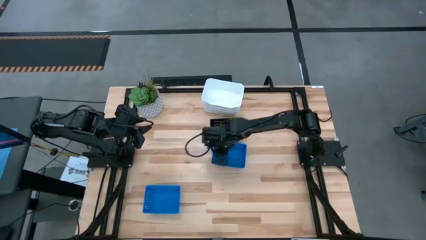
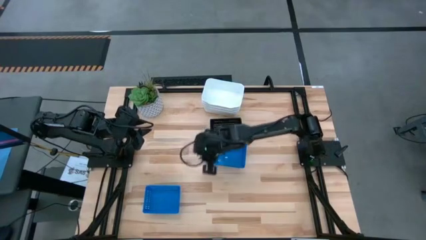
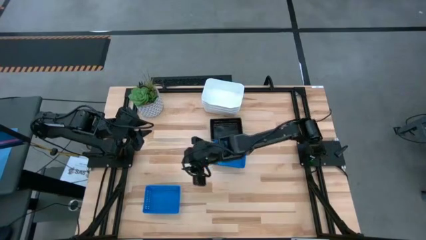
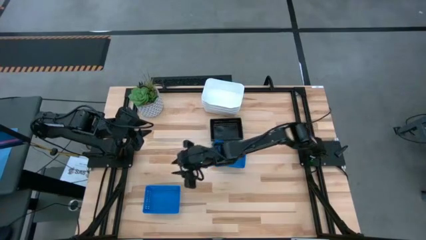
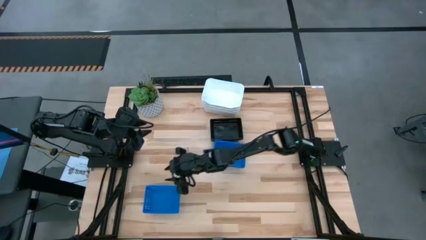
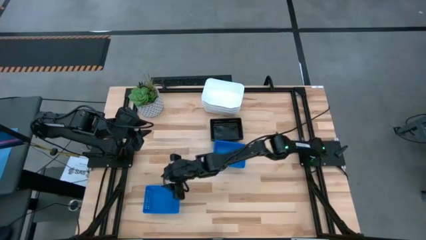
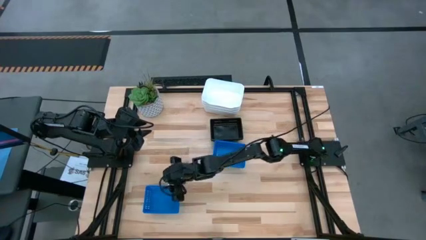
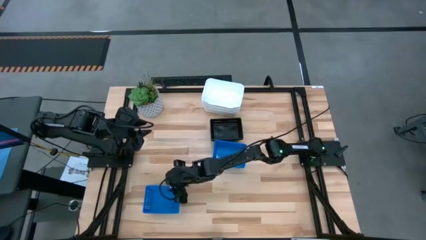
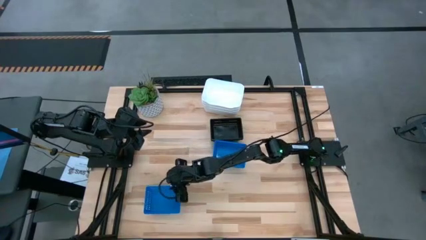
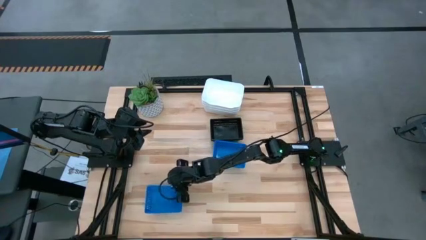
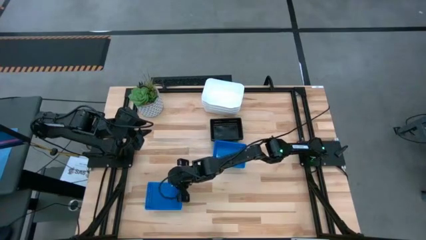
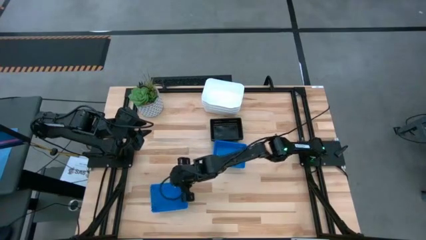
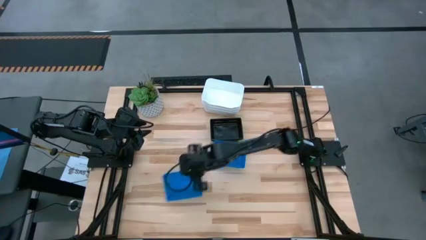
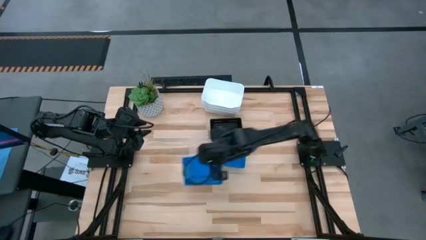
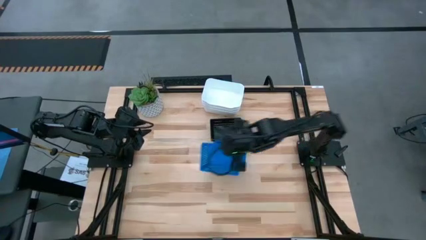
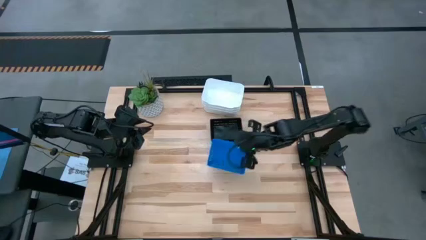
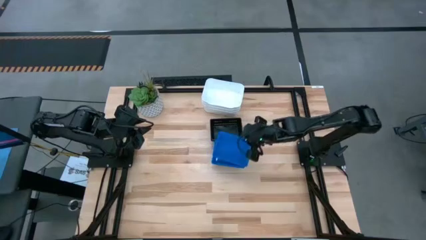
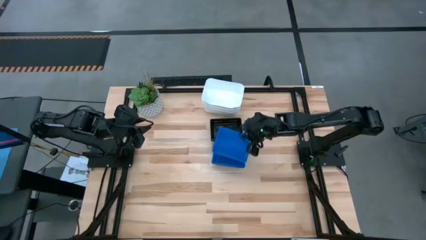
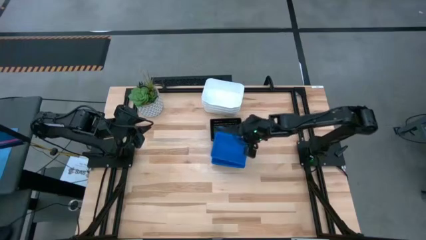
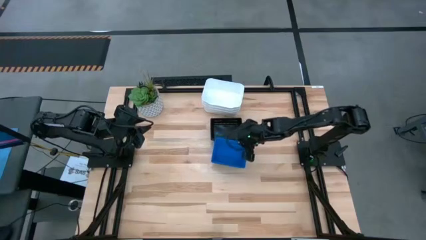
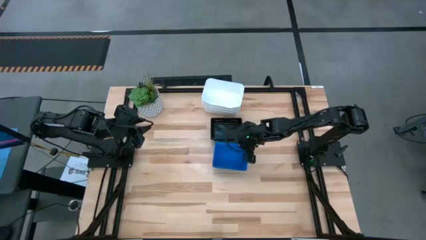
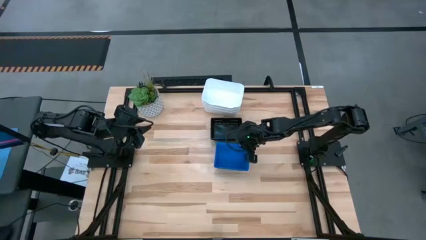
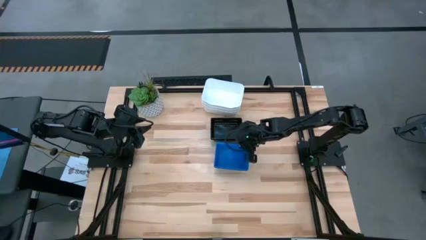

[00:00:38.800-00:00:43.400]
Stack the left blue bin on the right blue bin

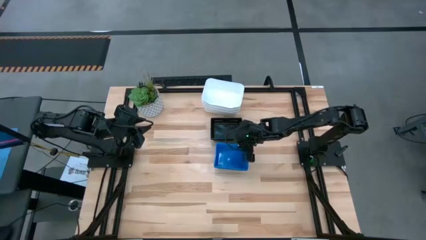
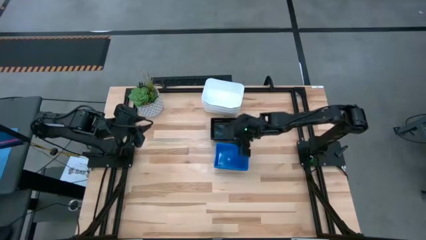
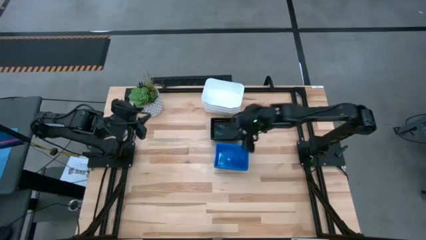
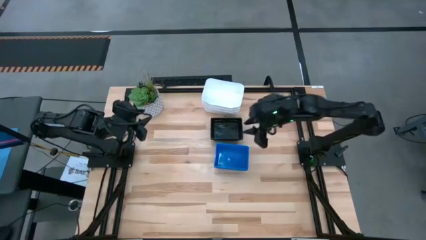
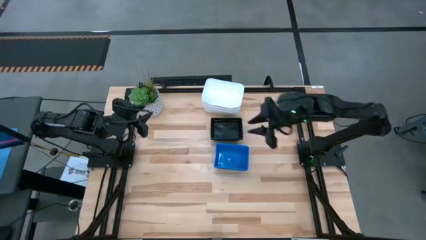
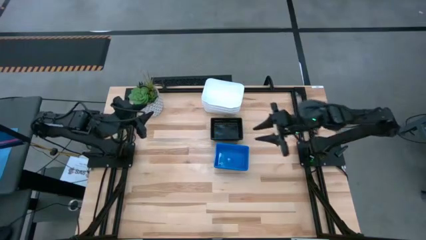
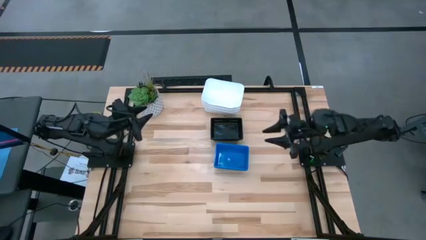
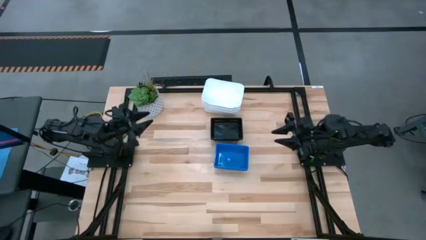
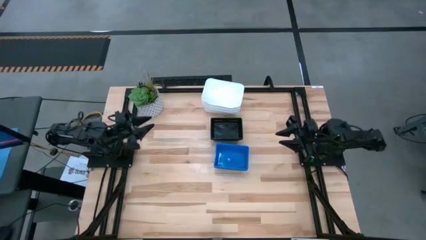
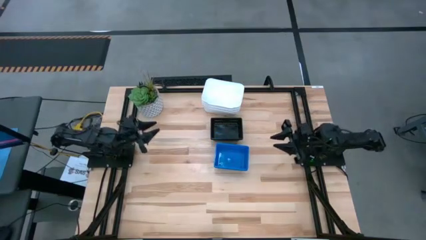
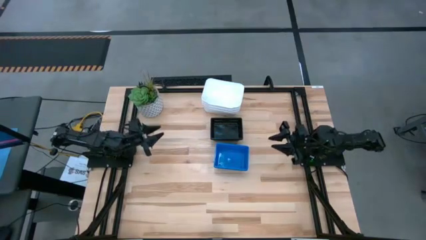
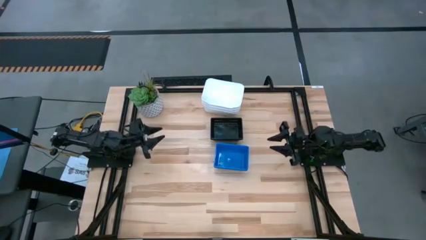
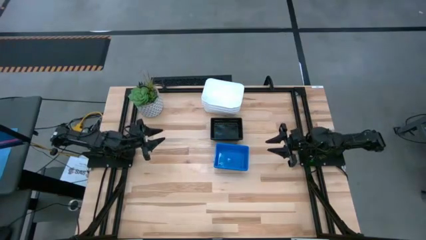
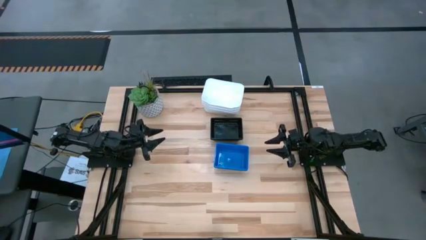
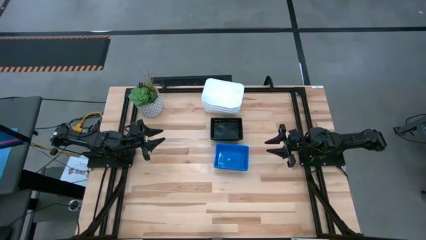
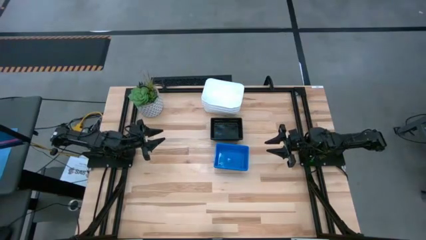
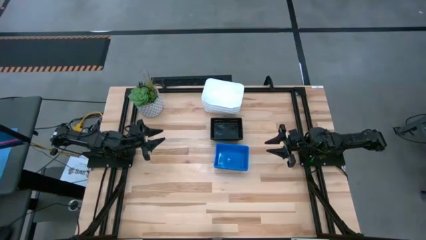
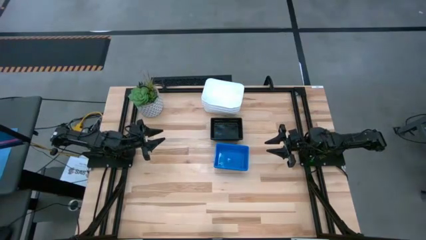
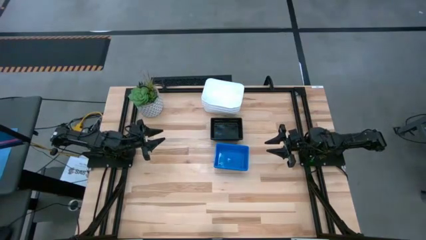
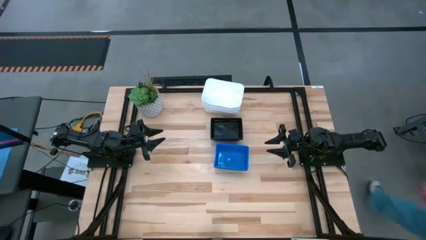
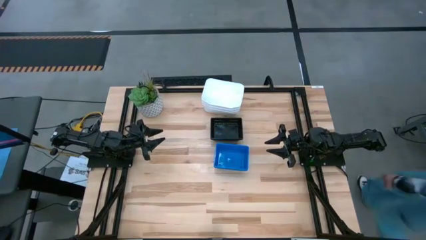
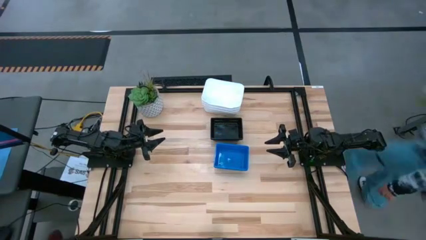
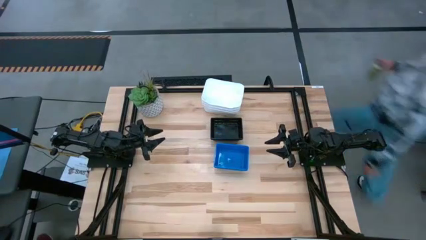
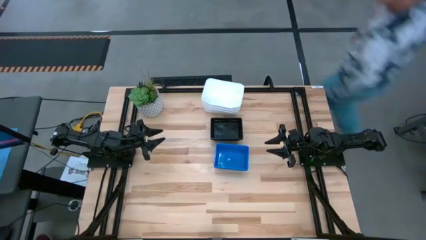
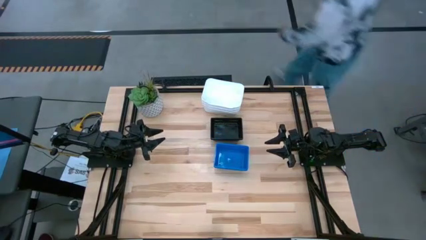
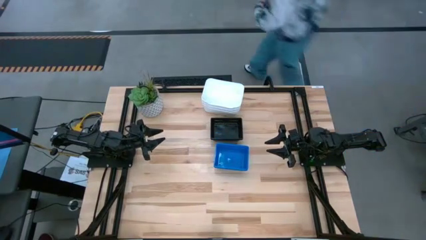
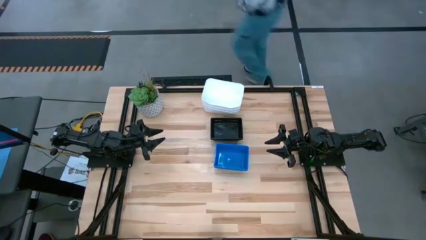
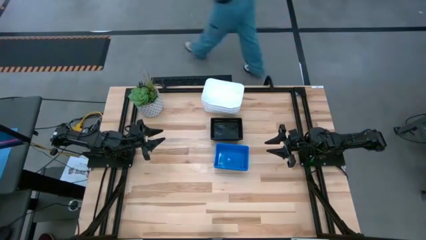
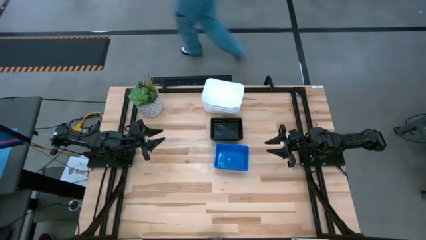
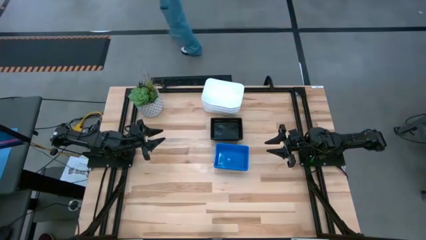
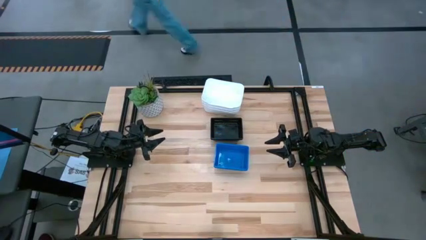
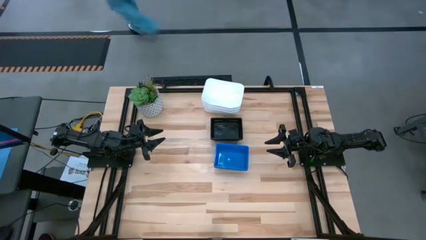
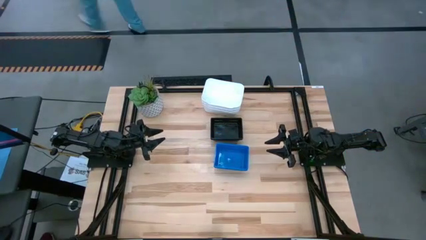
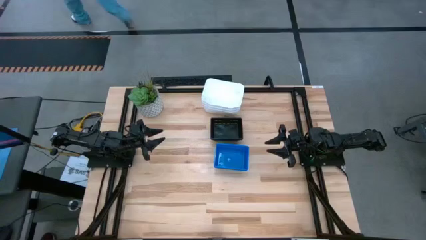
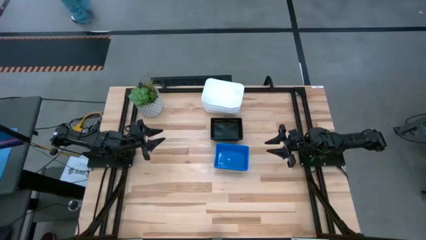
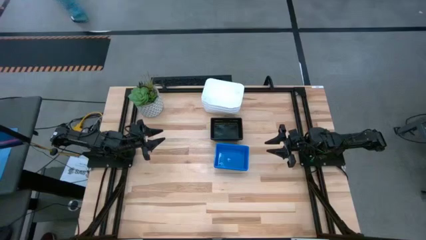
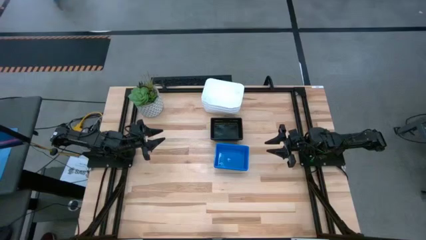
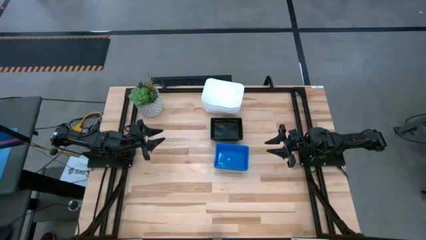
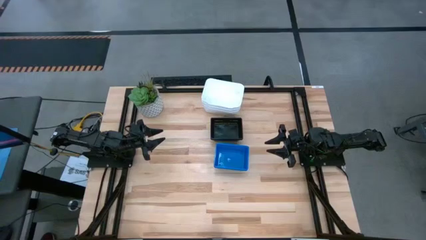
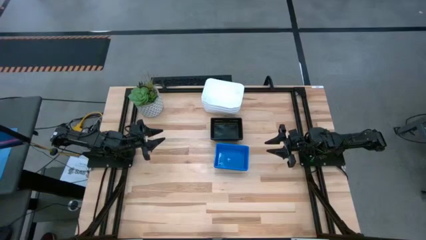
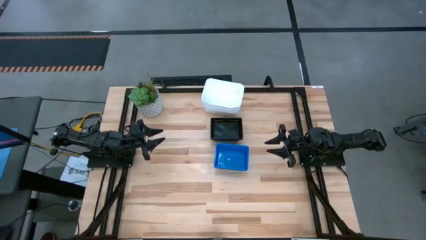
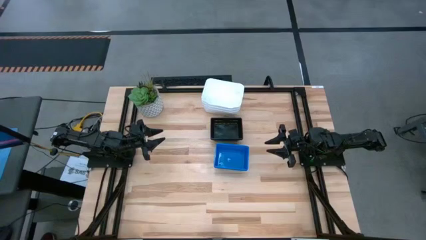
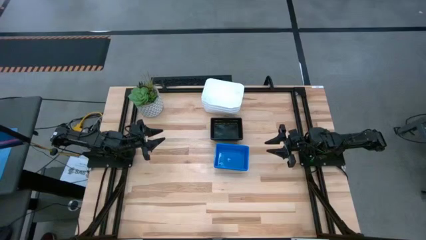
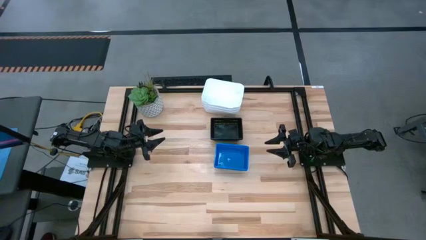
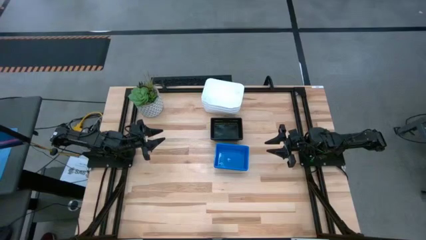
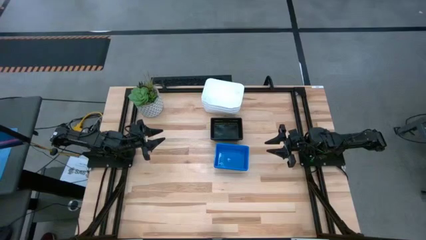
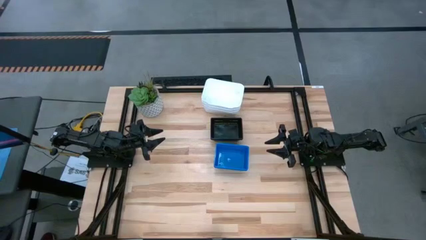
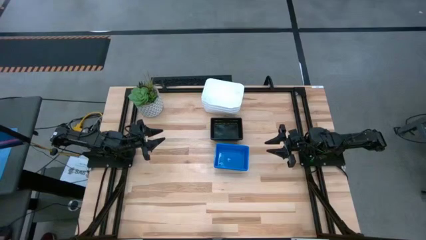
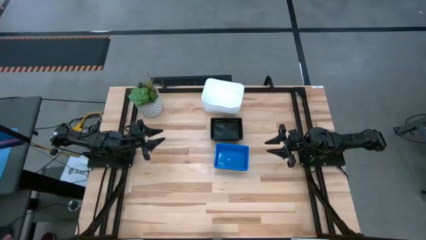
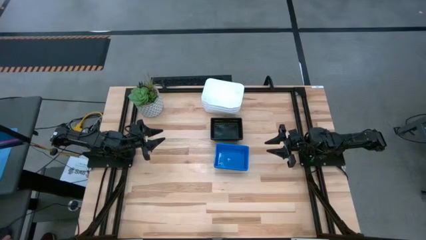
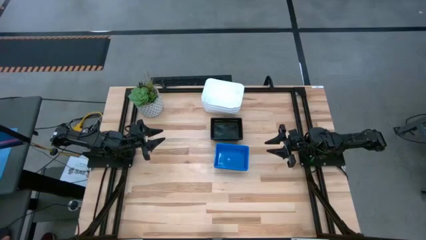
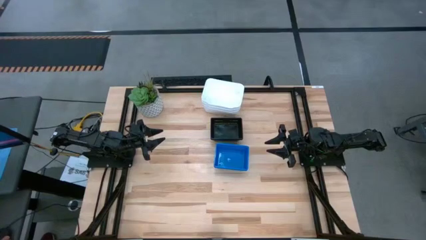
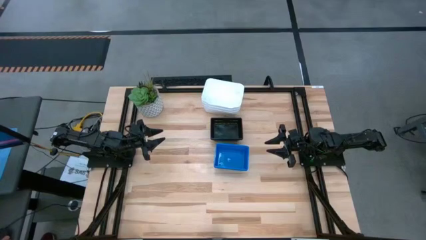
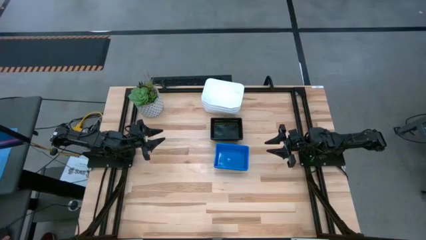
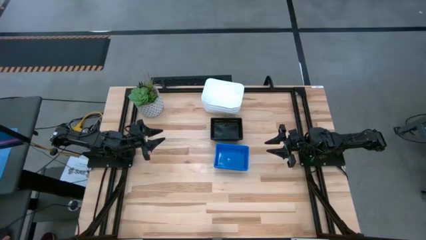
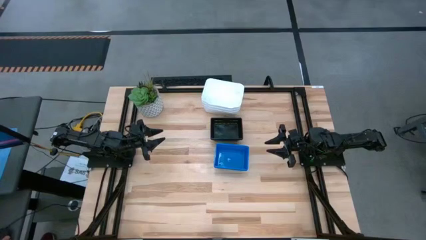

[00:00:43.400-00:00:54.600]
Return to Home Position
